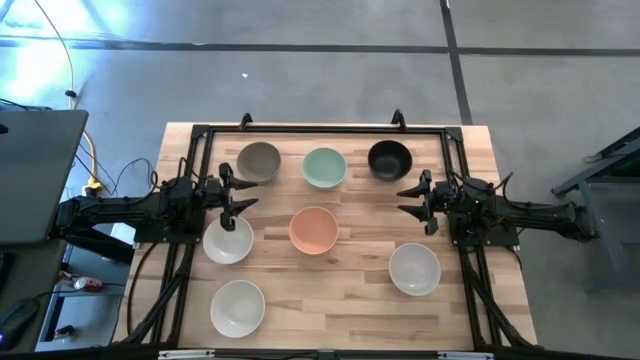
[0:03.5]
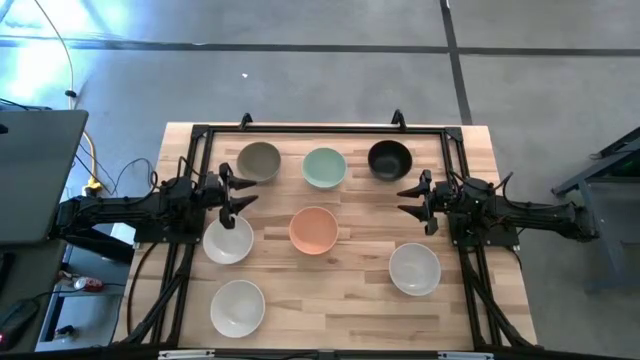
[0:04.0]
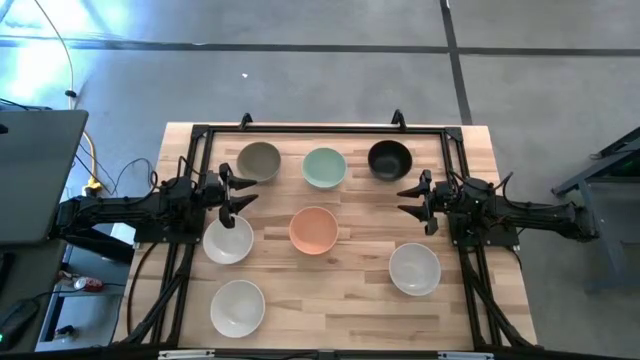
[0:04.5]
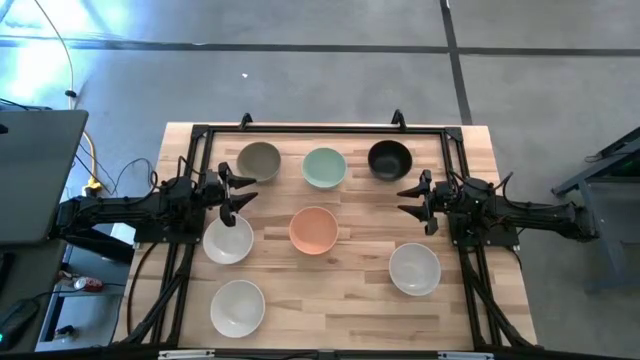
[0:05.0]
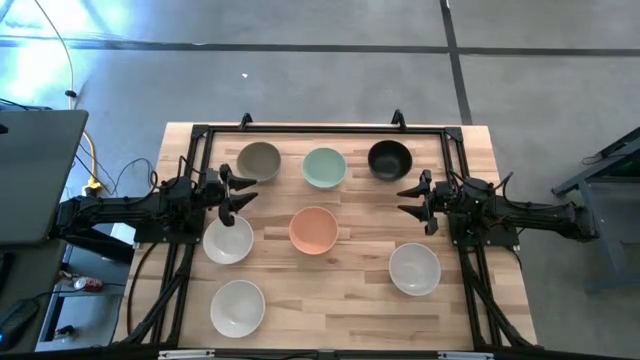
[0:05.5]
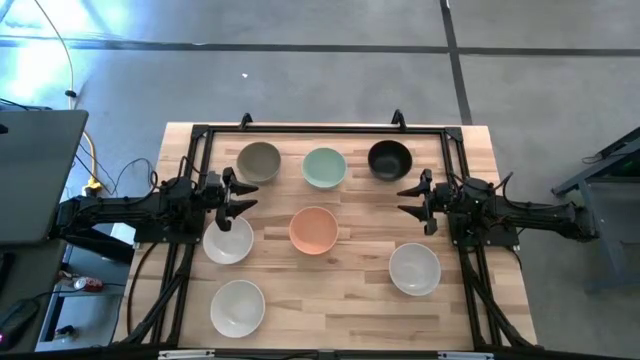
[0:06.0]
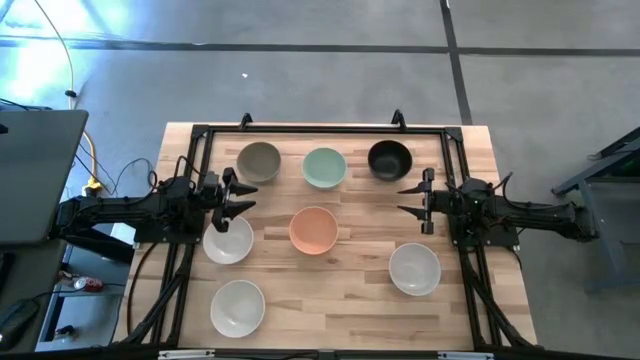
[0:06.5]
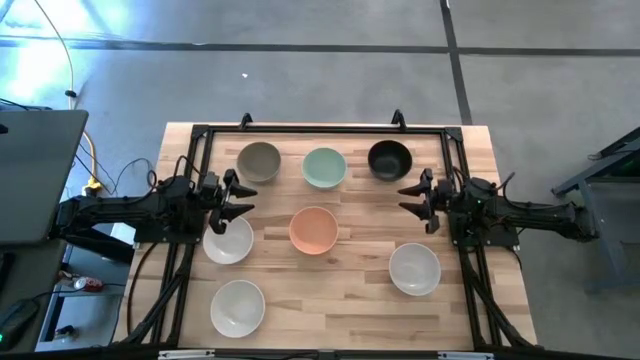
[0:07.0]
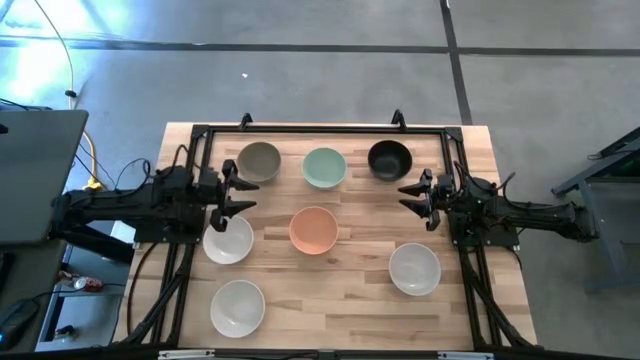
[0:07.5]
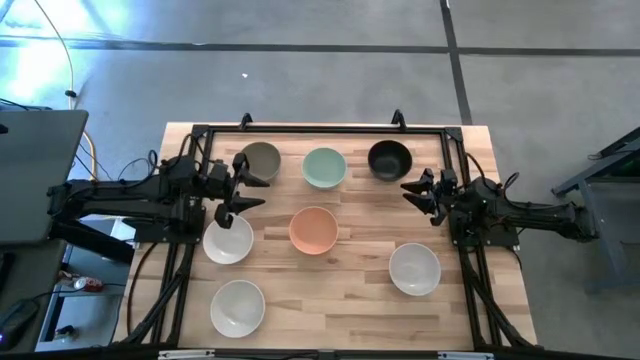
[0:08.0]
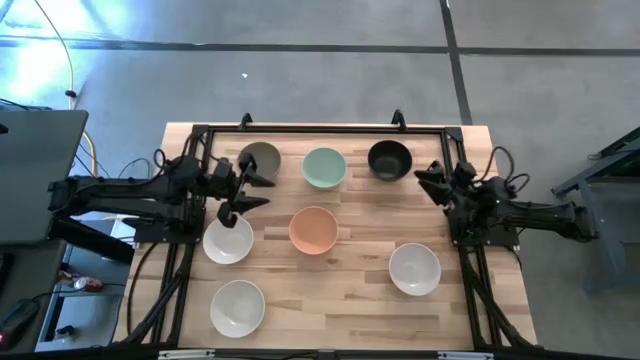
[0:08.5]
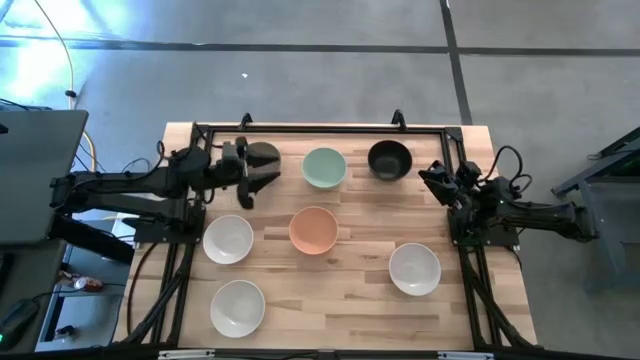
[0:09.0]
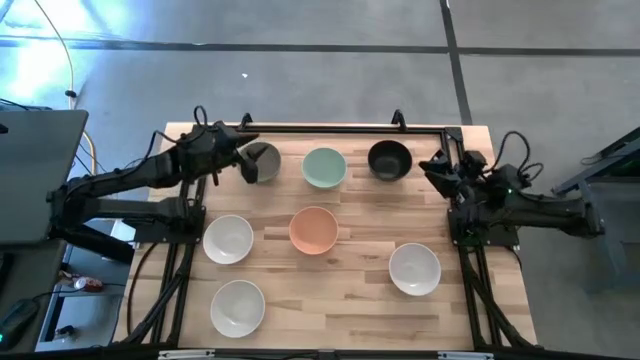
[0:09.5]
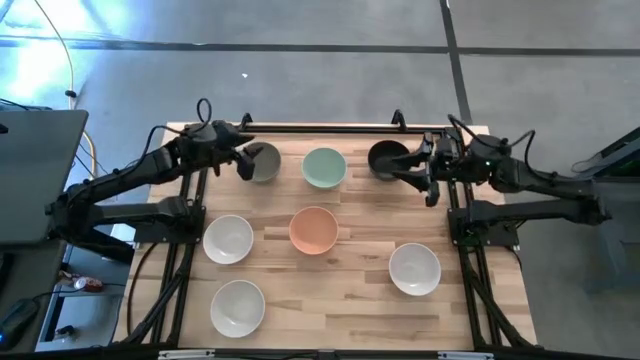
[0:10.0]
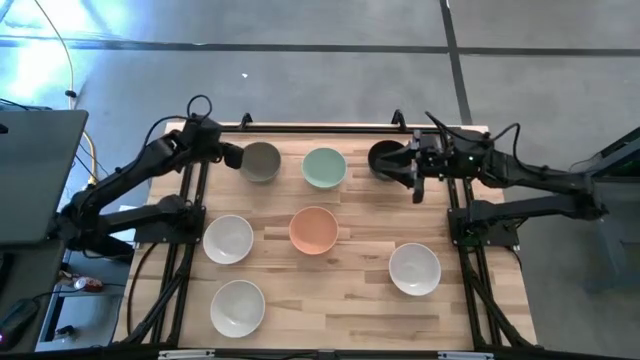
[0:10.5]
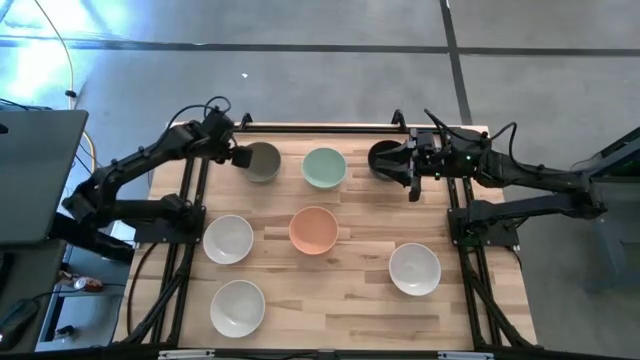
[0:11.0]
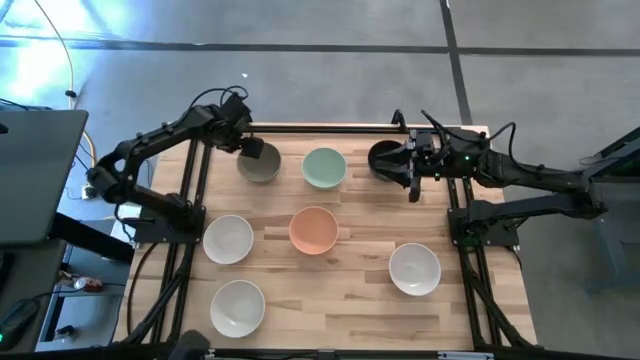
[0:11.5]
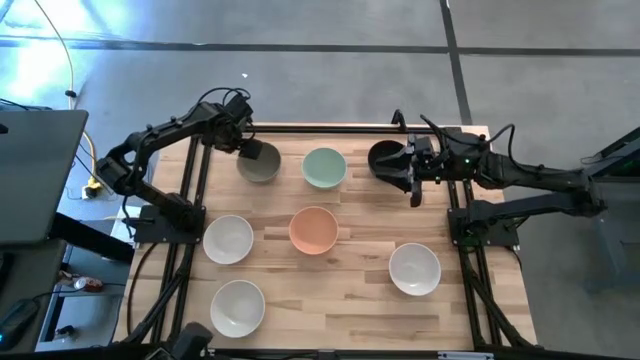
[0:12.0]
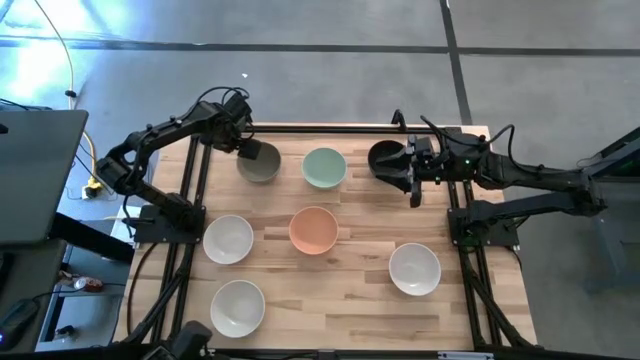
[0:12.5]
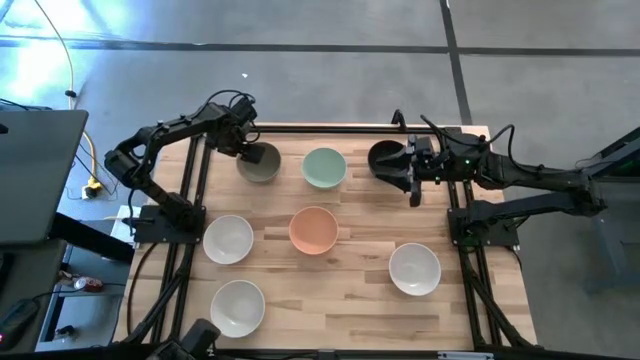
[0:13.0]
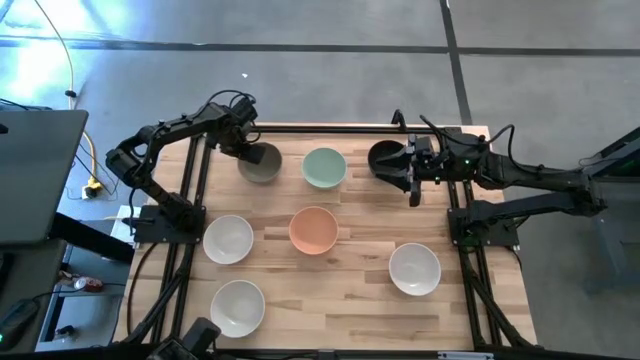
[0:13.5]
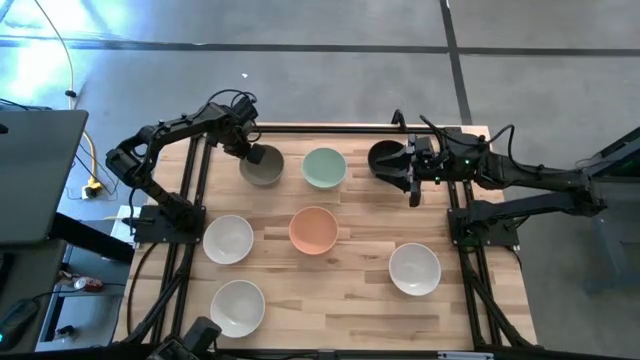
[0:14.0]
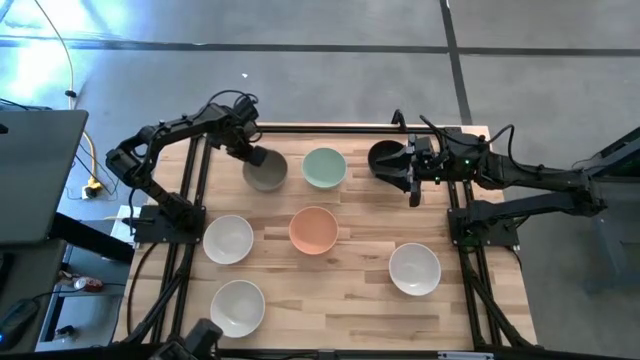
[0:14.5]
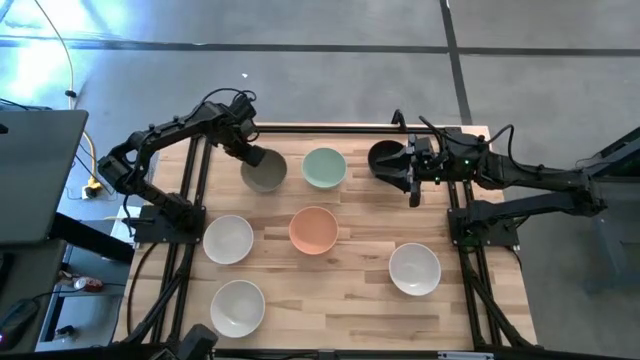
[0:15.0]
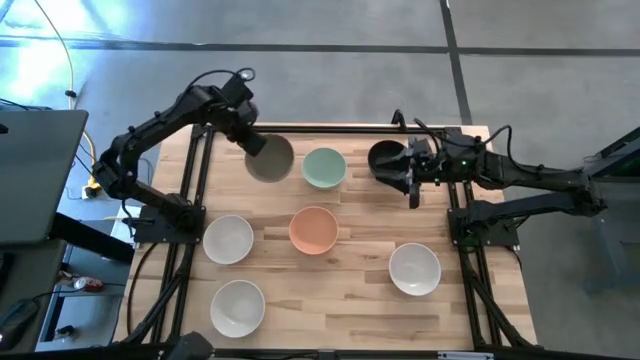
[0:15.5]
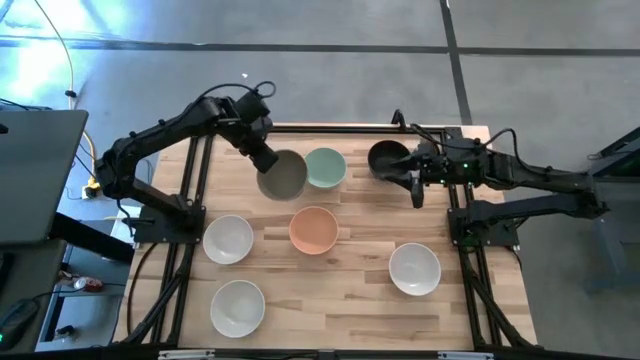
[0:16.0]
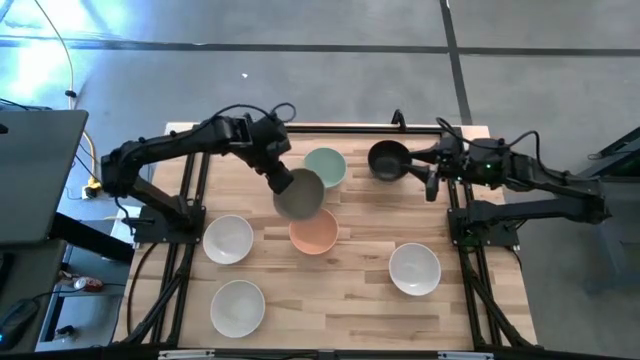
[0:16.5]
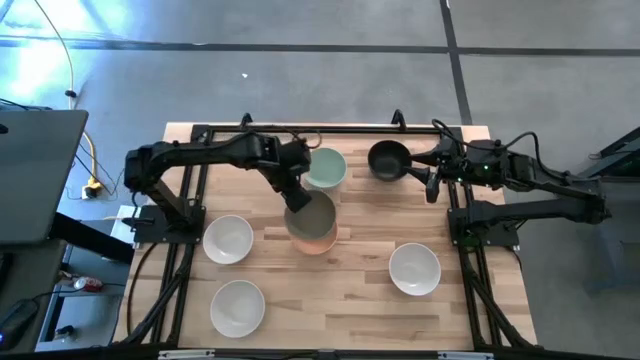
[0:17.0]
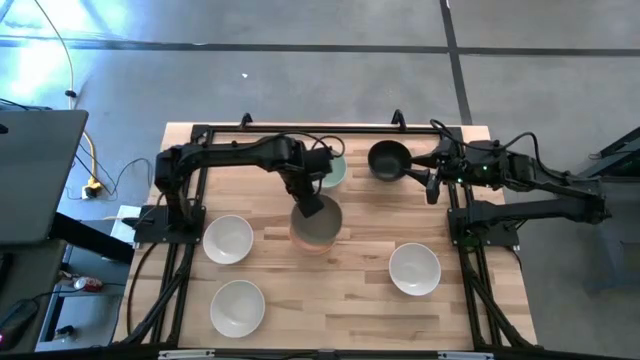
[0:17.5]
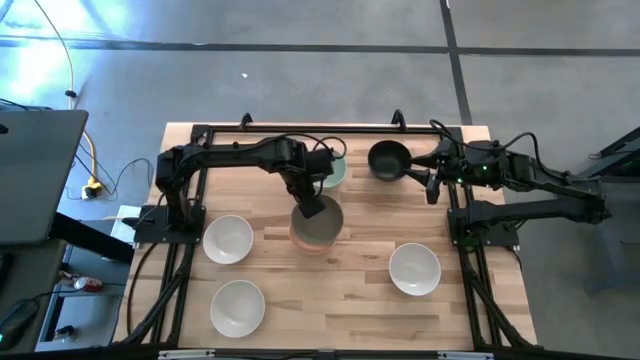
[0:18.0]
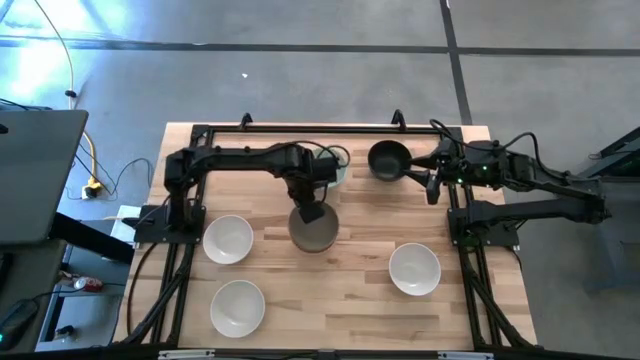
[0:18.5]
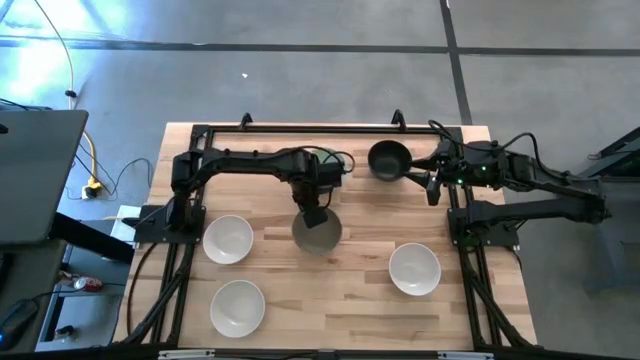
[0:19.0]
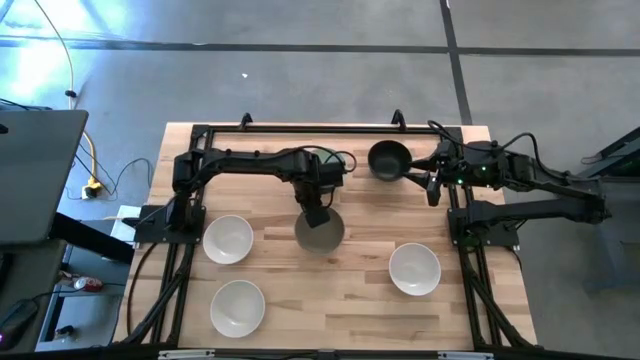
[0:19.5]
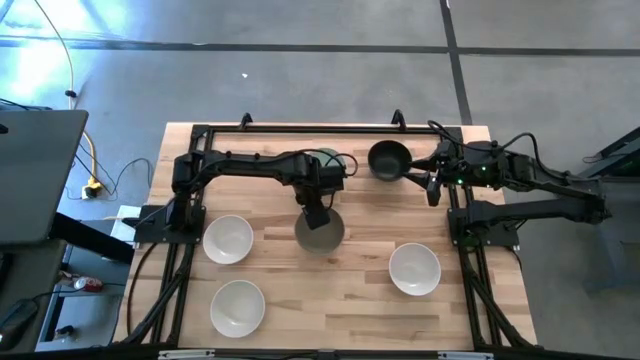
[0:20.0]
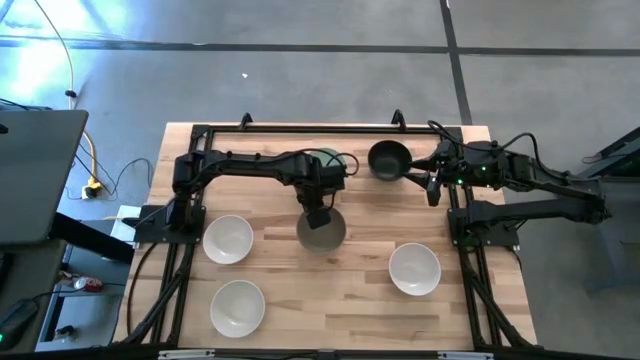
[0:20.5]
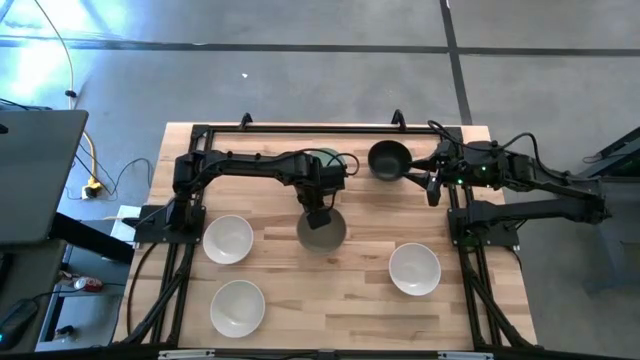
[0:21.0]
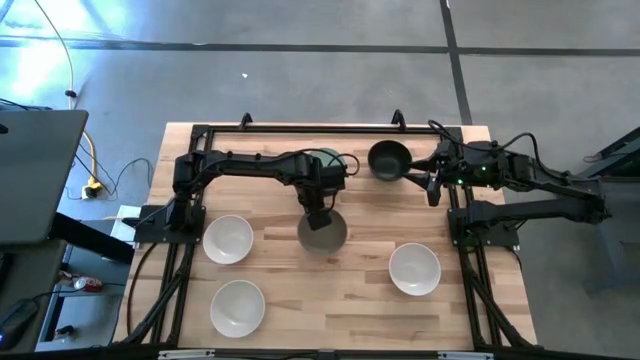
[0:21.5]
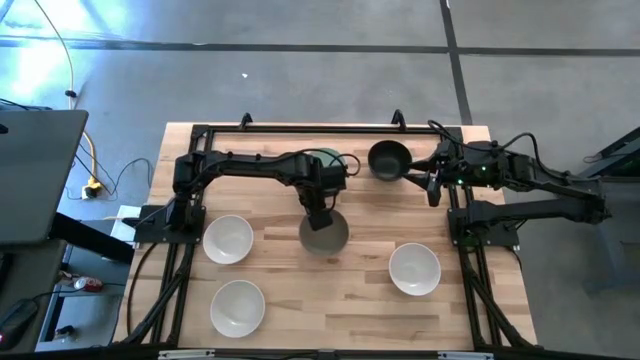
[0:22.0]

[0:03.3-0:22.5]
Task: Nest bowls inside each other
Stack the grey bowl on top of the orange bowl
